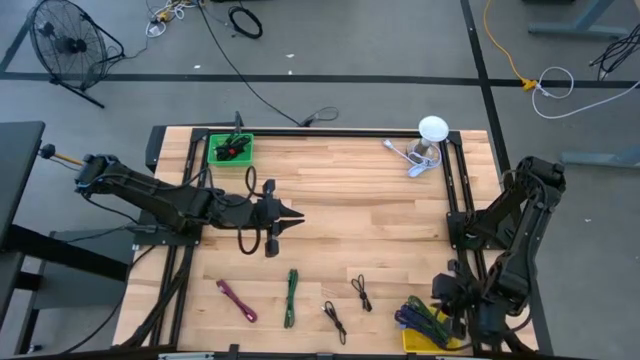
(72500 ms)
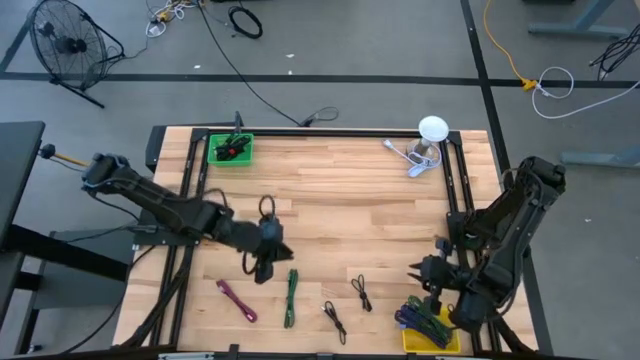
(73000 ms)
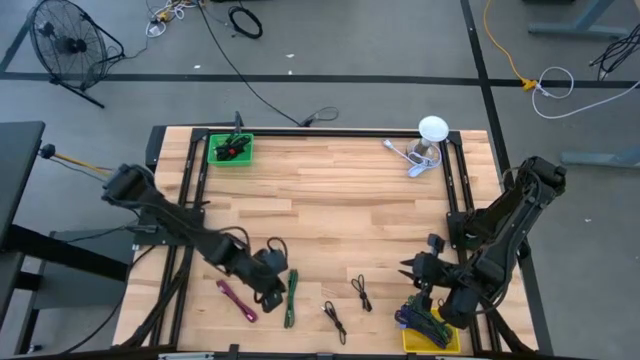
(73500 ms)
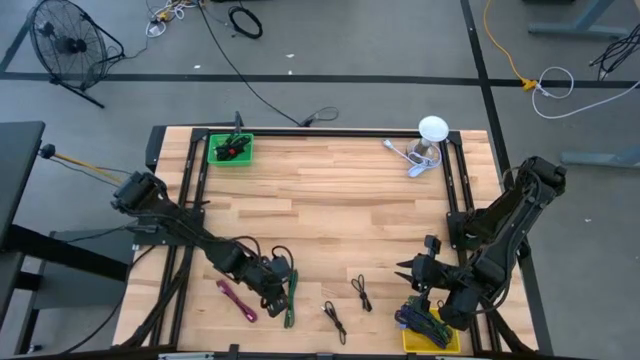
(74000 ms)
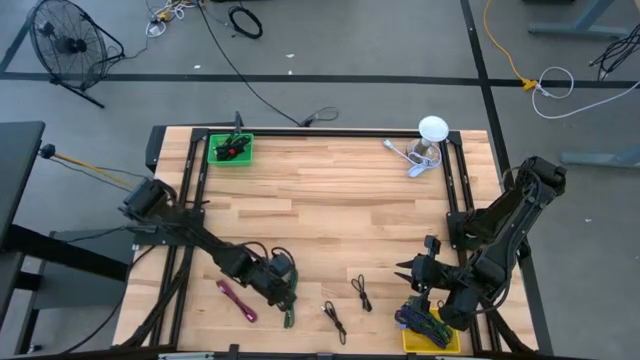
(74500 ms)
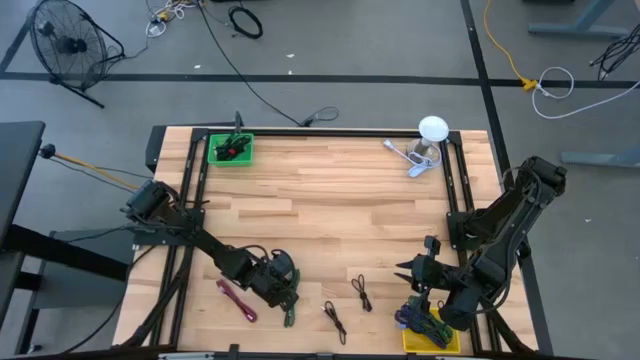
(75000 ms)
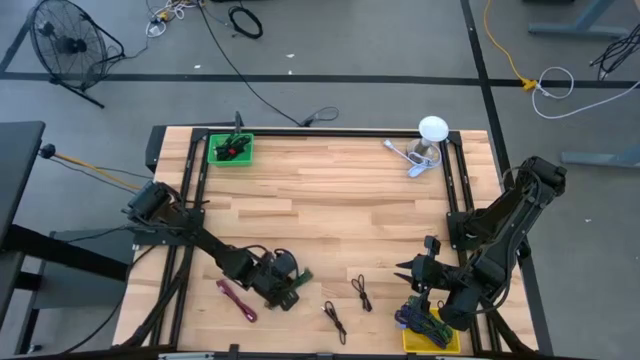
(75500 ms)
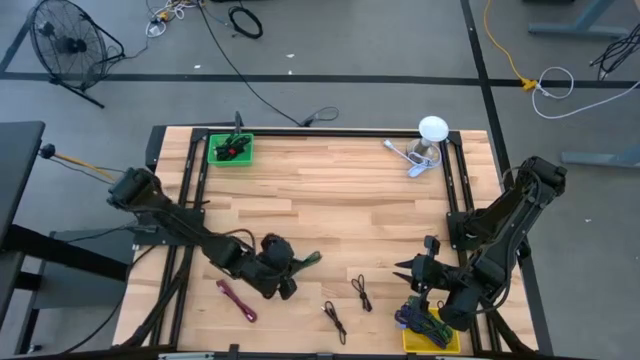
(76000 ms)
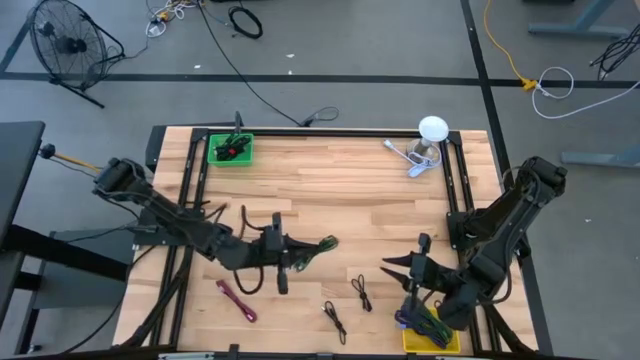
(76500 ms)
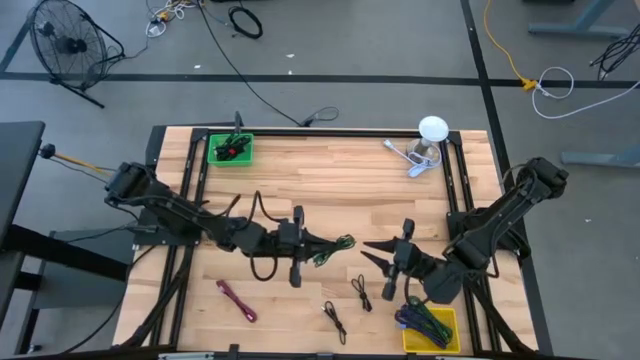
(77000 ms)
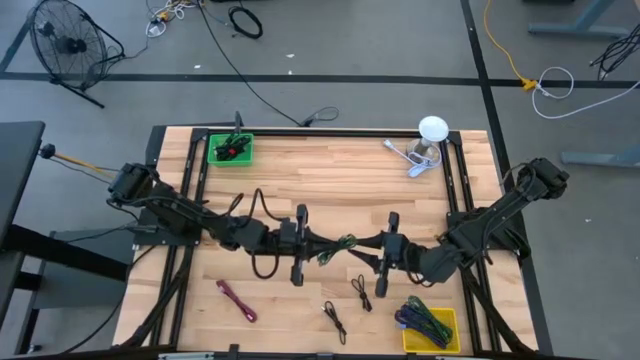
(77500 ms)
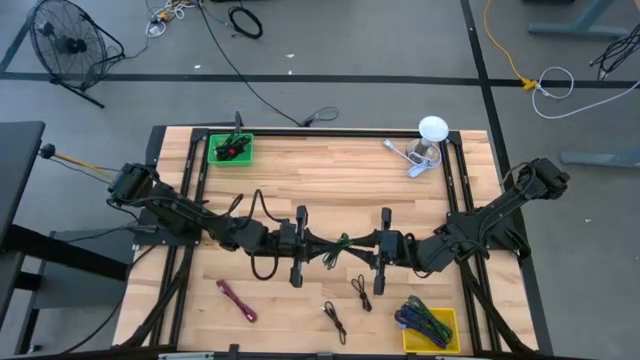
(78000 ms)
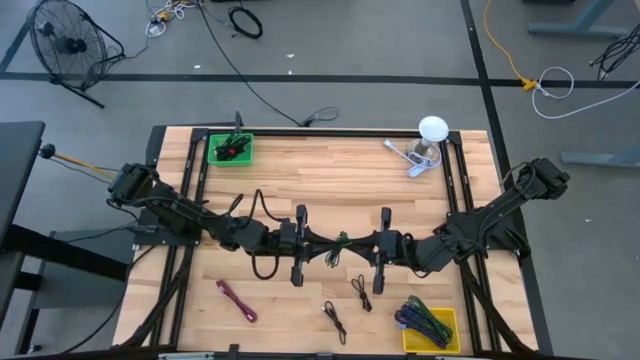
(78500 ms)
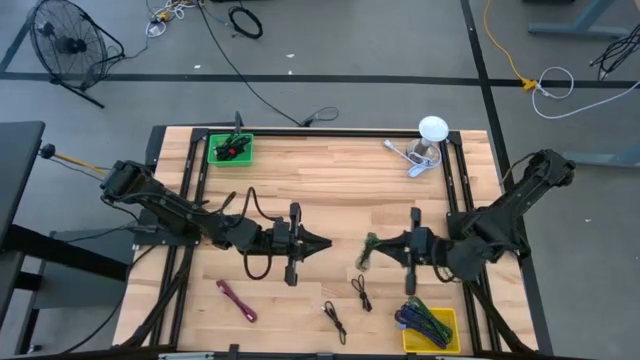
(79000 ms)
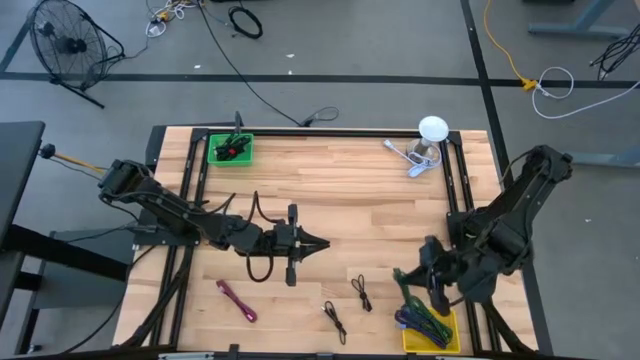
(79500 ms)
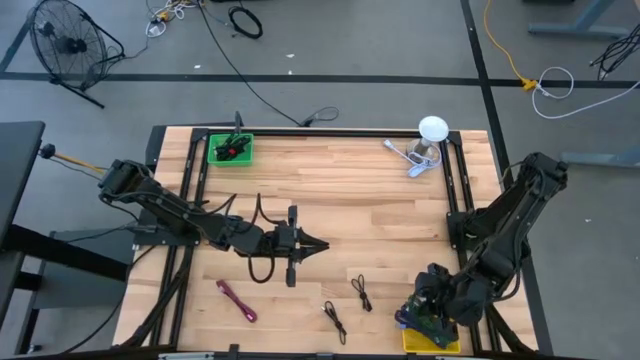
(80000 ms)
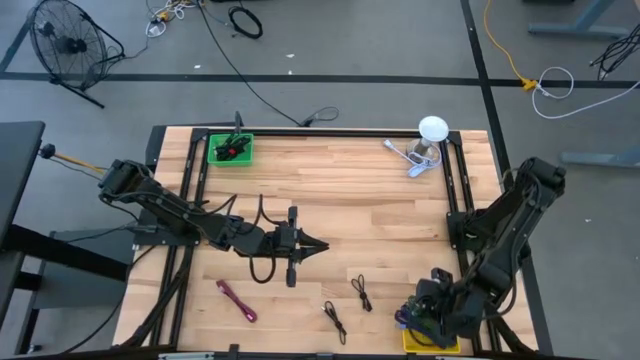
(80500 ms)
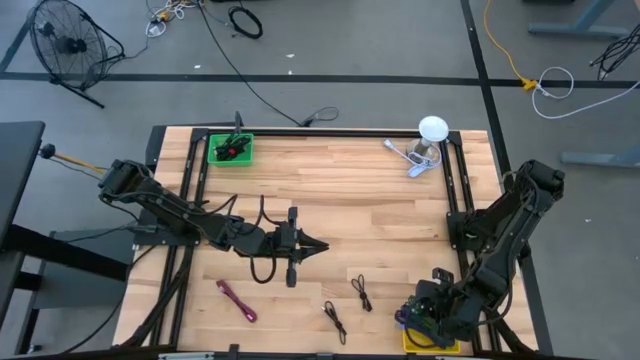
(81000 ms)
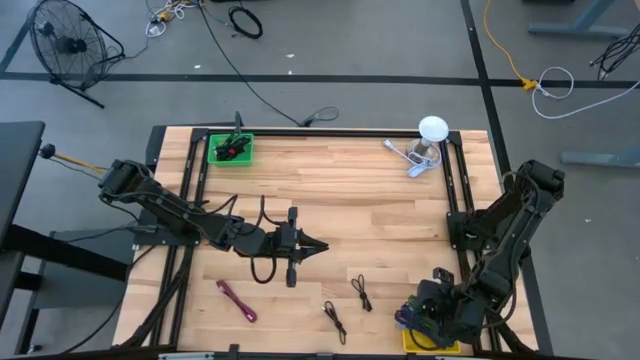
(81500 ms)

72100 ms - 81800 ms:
Task: Pick & Place USB Port
Put the green charger cable into the yellow bin

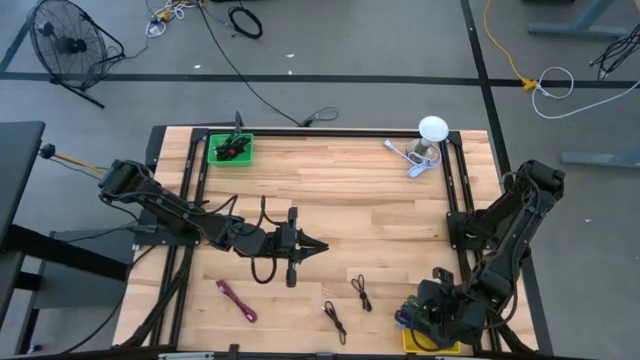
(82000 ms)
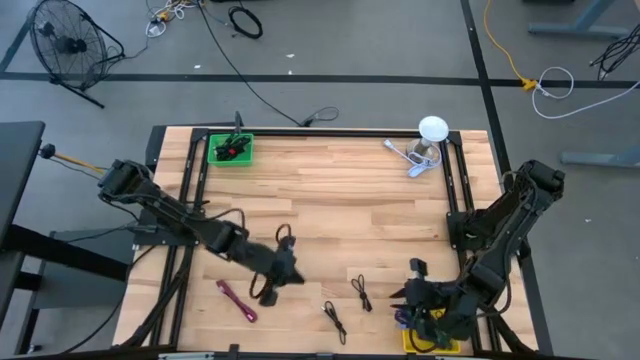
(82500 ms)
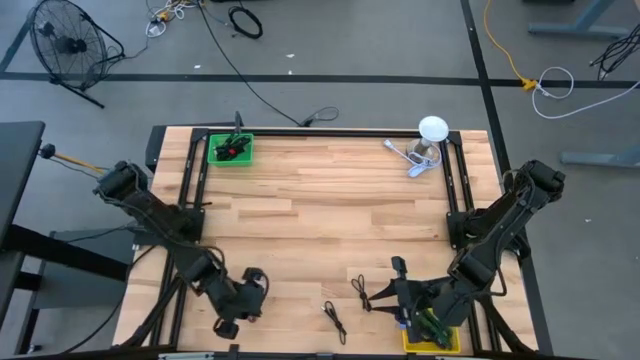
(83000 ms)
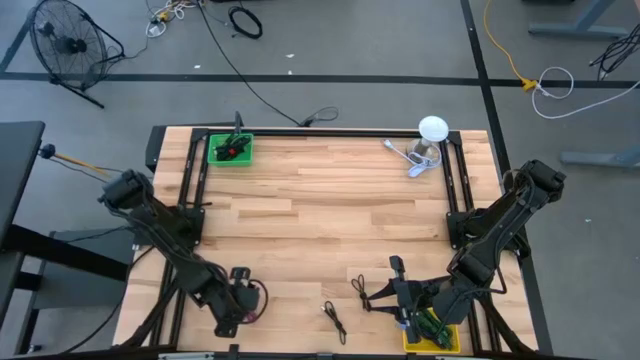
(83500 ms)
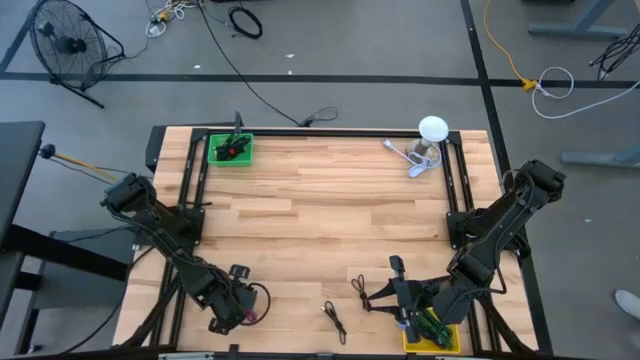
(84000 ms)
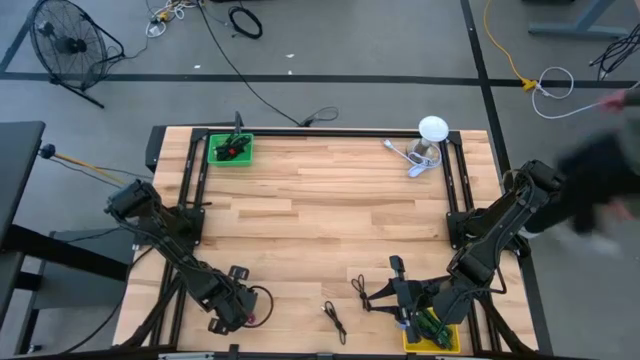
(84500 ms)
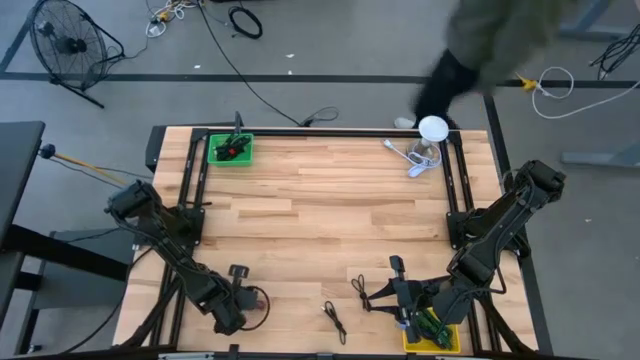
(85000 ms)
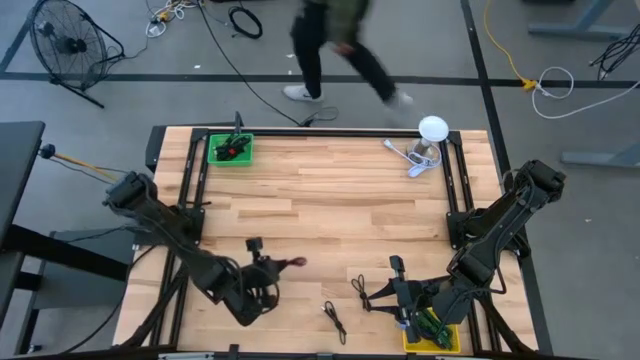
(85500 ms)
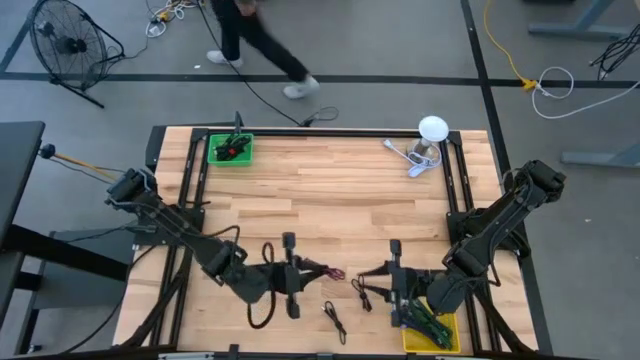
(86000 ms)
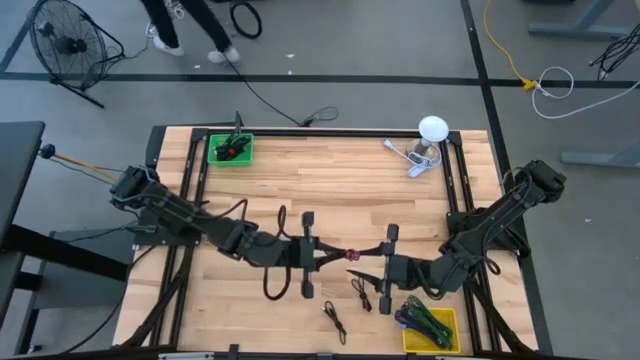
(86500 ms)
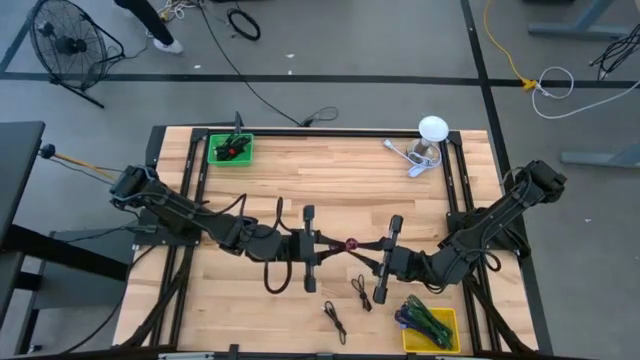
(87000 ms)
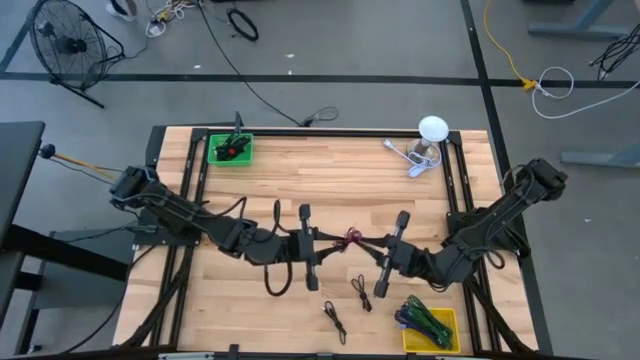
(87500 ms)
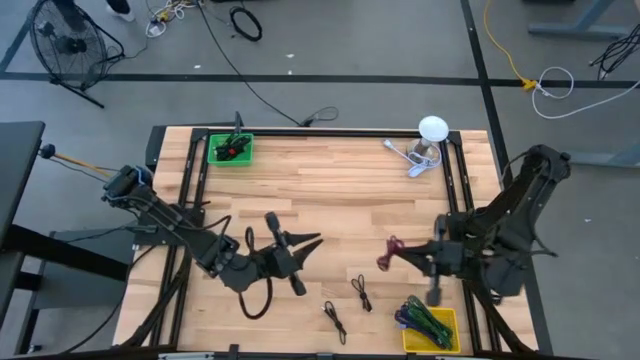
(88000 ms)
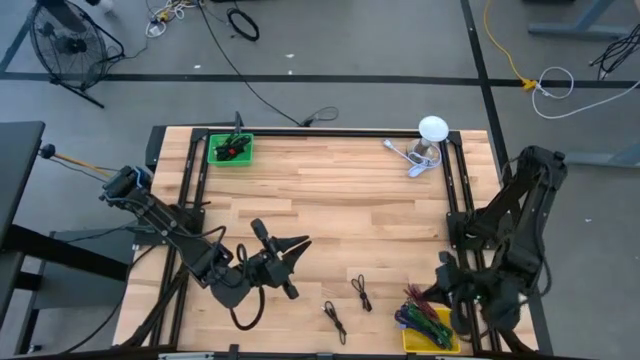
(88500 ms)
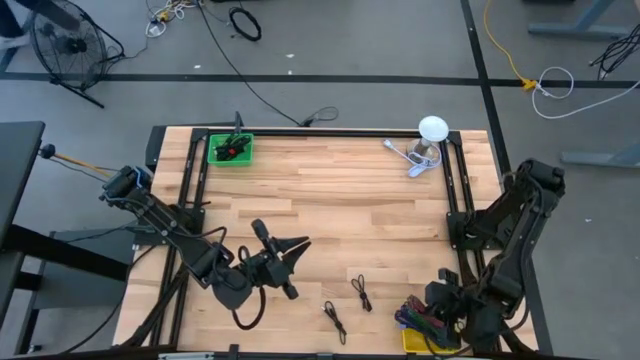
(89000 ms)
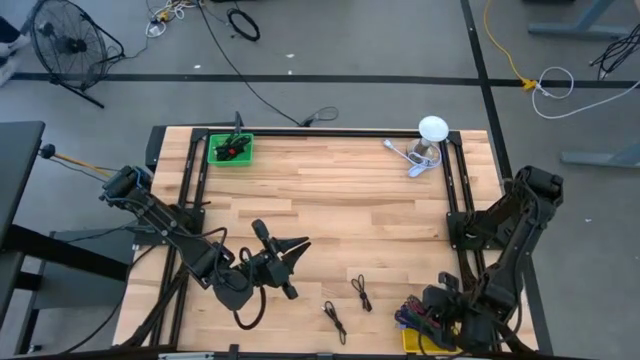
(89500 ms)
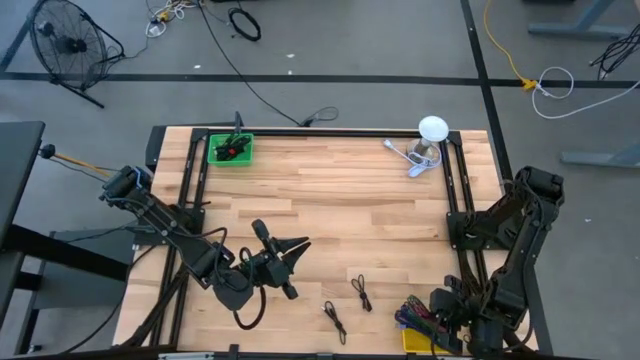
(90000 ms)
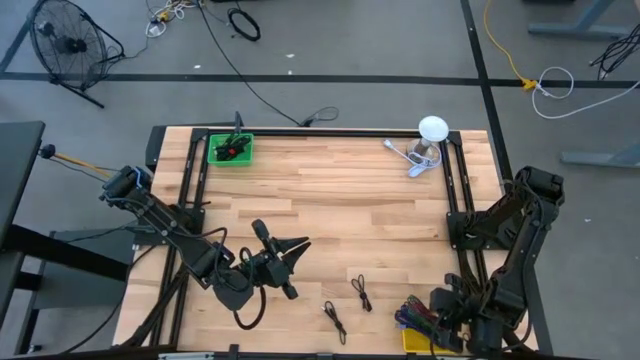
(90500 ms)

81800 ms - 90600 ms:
Put the pink charger cable into the yellow bin

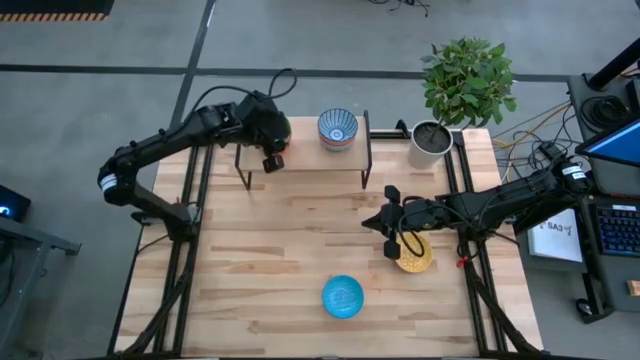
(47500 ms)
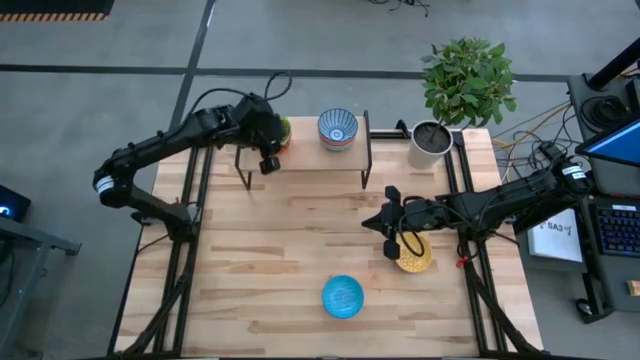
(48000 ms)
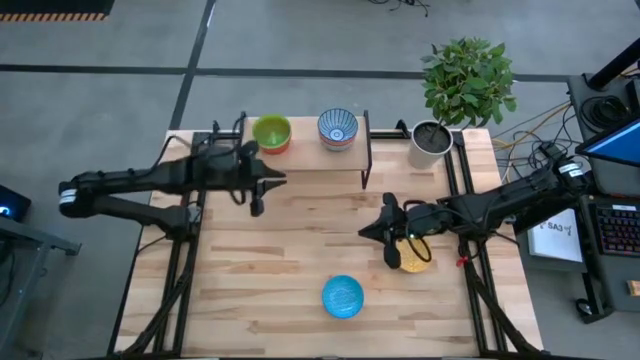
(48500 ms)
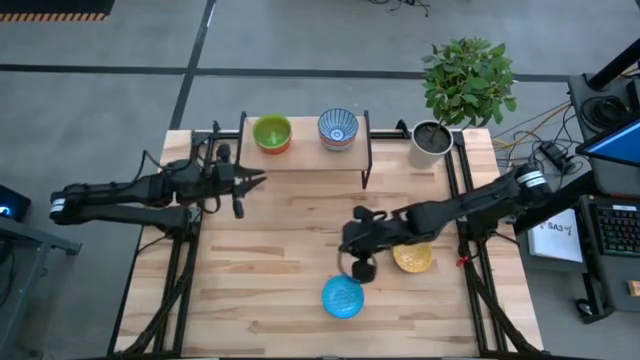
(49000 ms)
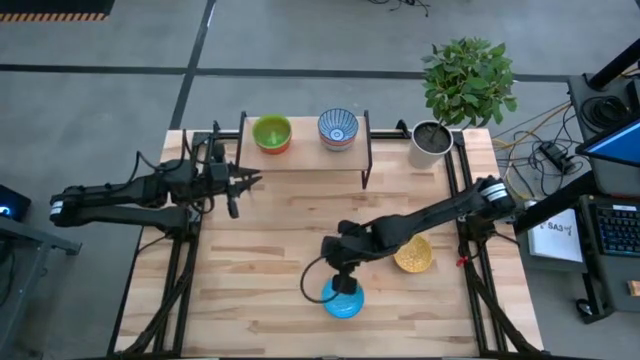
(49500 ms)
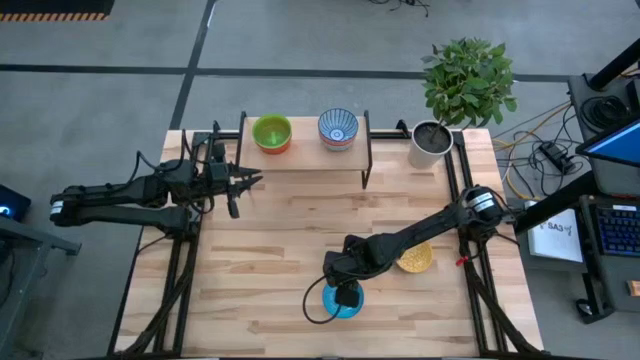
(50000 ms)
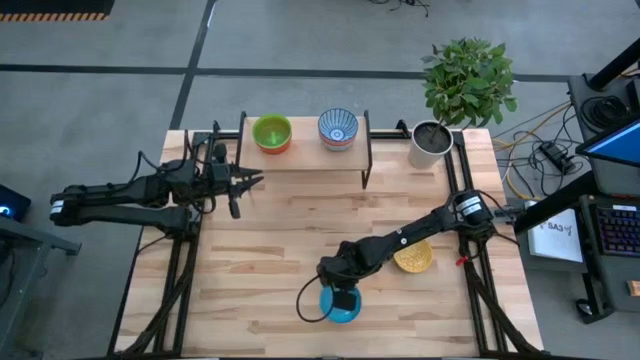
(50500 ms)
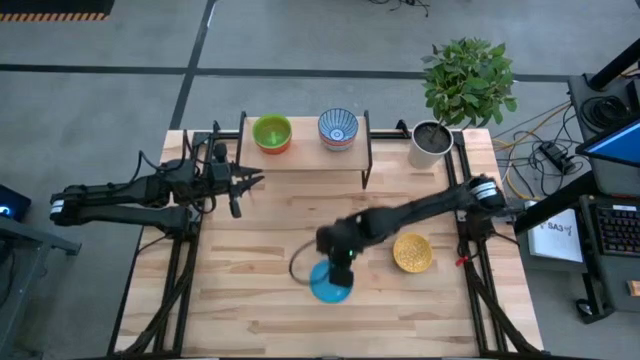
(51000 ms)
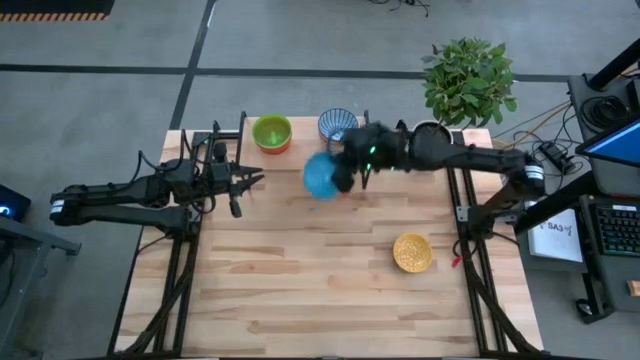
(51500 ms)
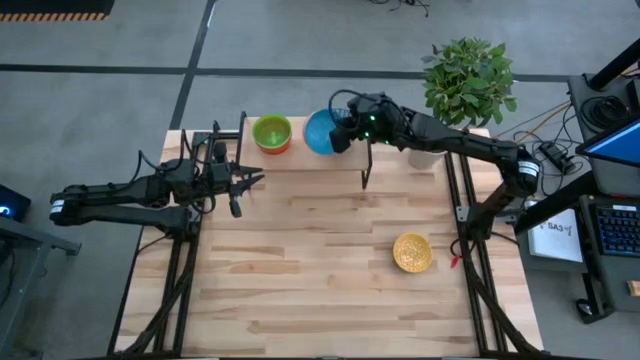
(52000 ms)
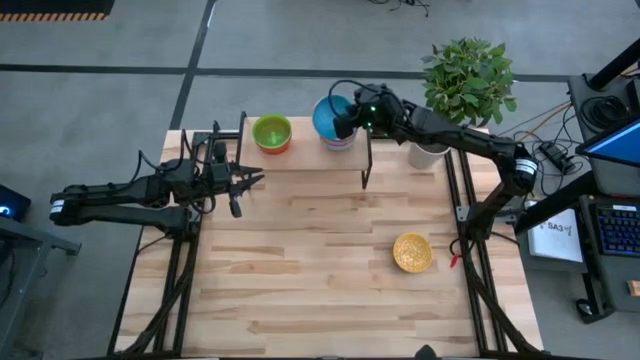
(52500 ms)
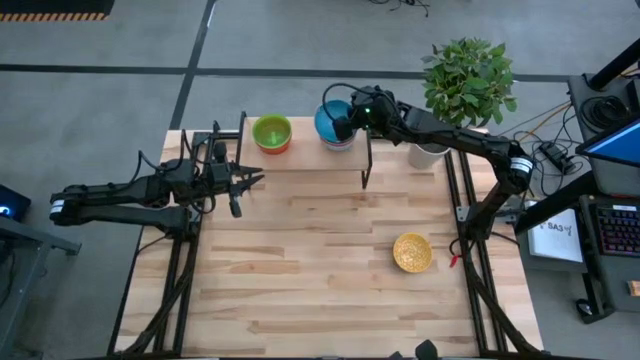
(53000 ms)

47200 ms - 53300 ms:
Task: Place and stack bowls onto a shelf
Stack the light blue patterned bowl on top of the blue patterned bowl on the shelf
